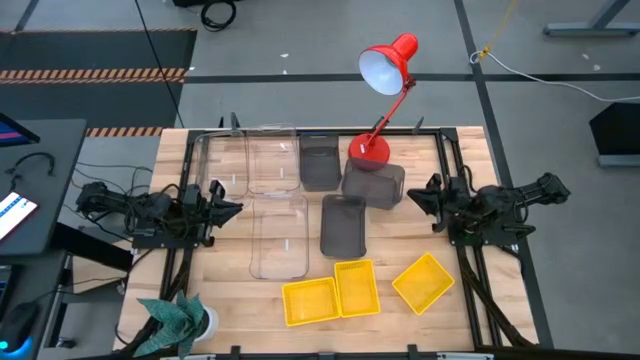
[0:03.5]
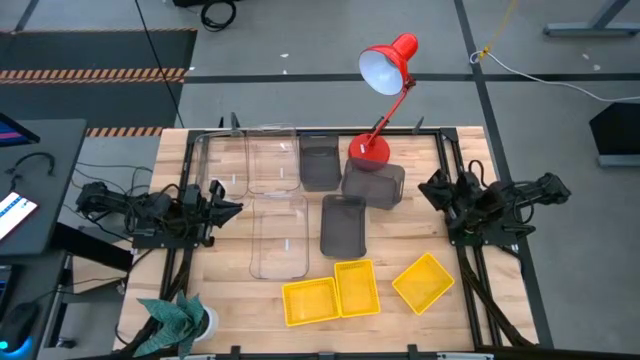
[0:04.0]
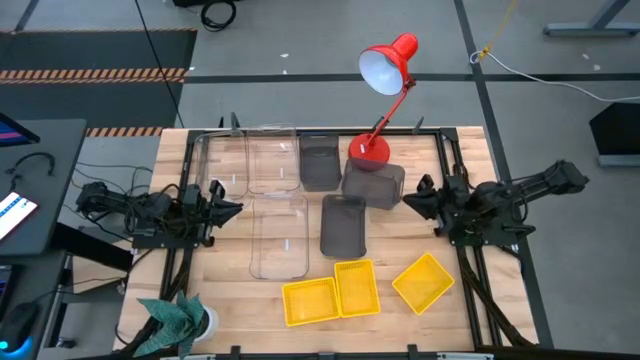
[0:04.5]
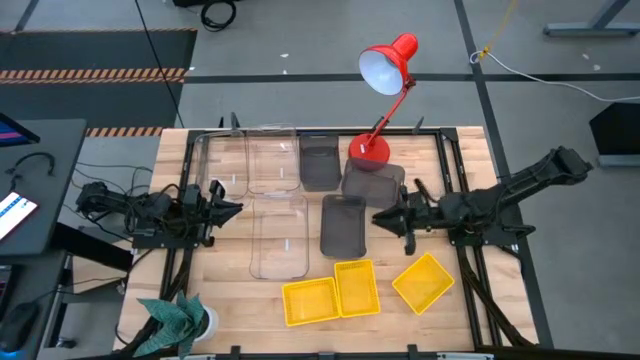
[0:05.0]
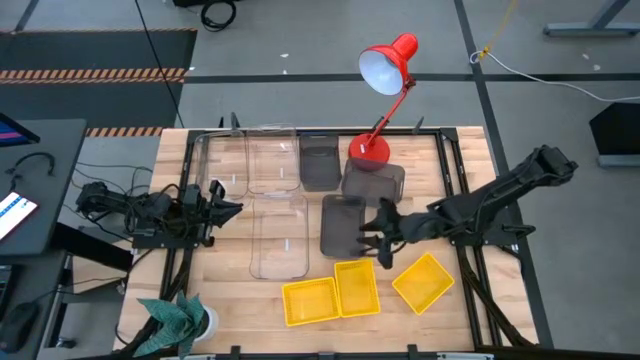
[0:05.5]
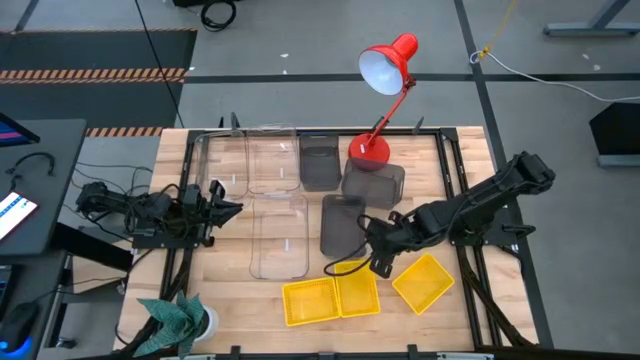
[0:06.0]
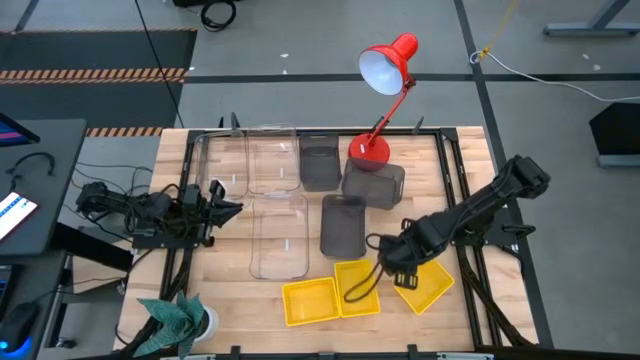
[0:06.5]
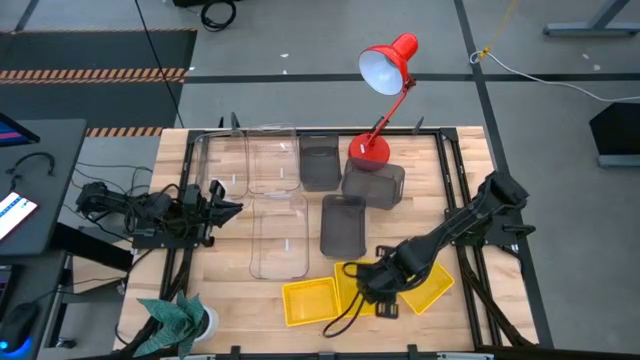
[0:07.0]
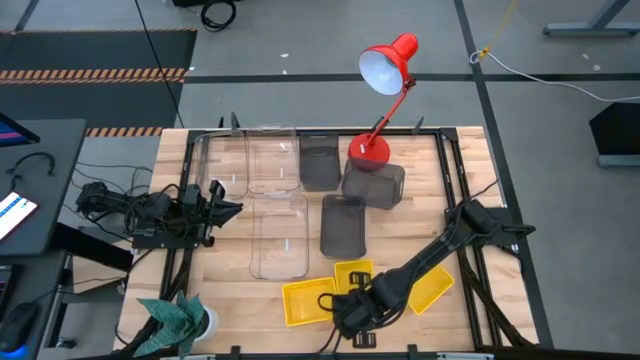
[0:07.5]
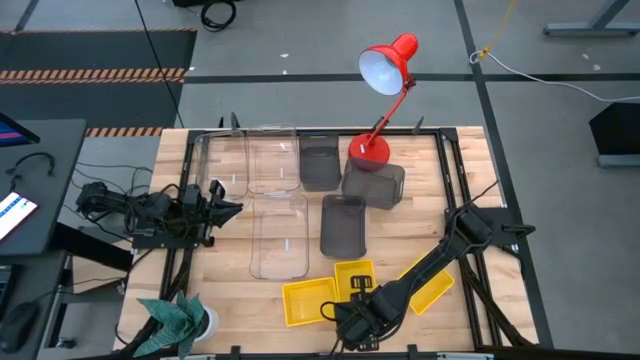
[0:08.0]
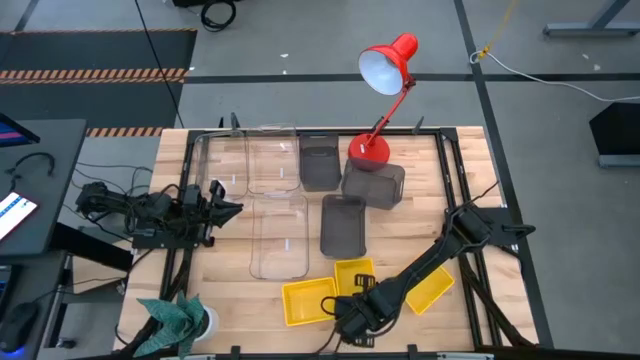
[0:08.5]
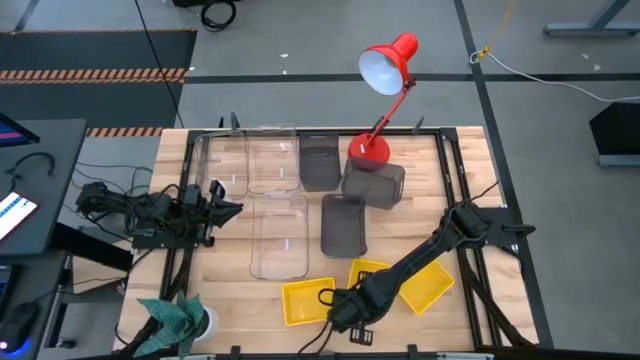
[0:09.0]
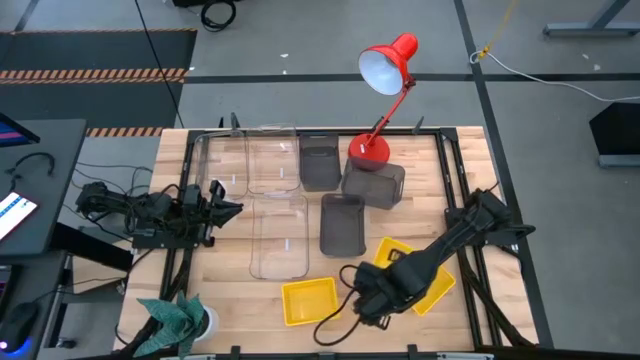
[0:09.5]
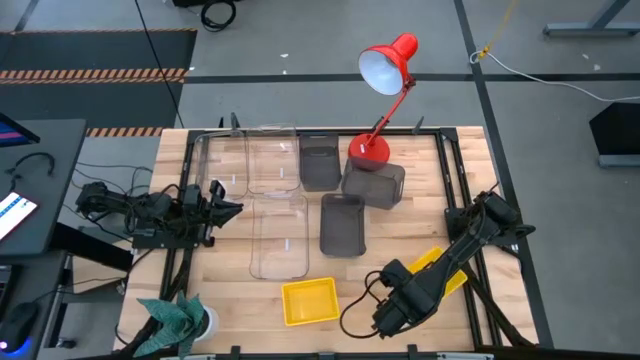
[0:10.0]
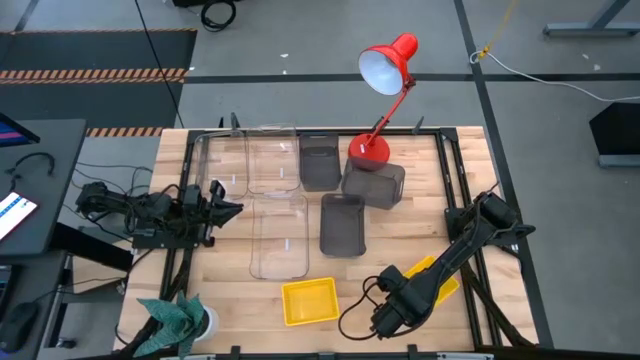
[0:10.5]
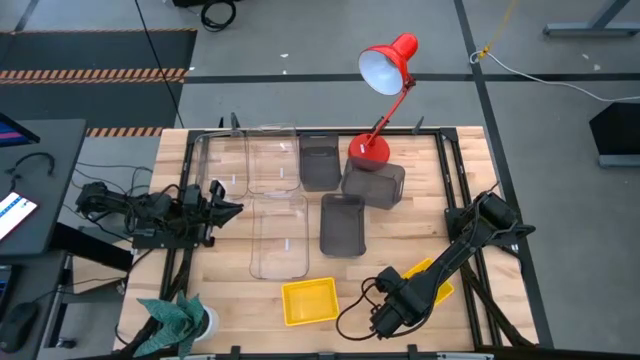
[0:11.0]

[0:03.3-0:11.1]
Stack the middle yellow bin on top of the right yellow bin

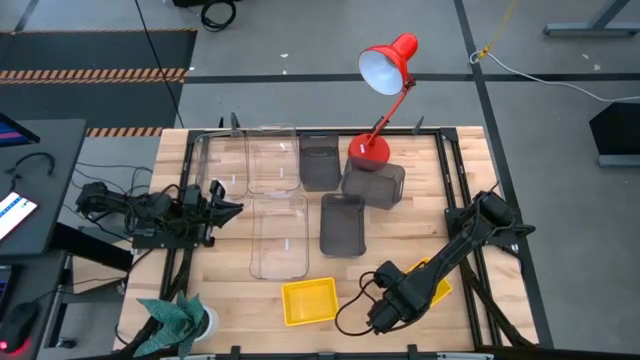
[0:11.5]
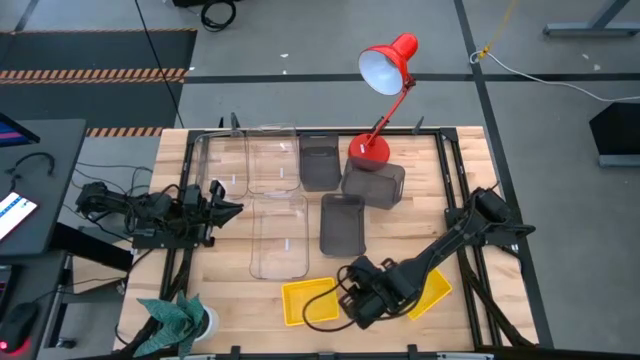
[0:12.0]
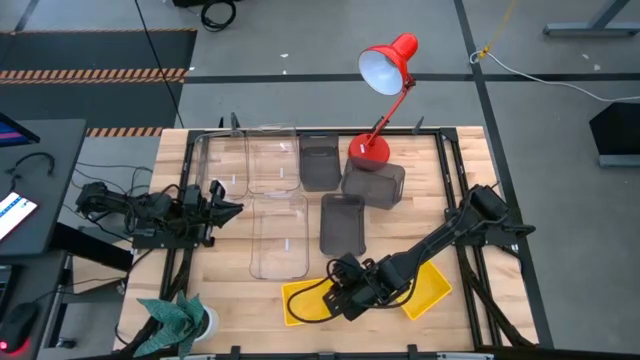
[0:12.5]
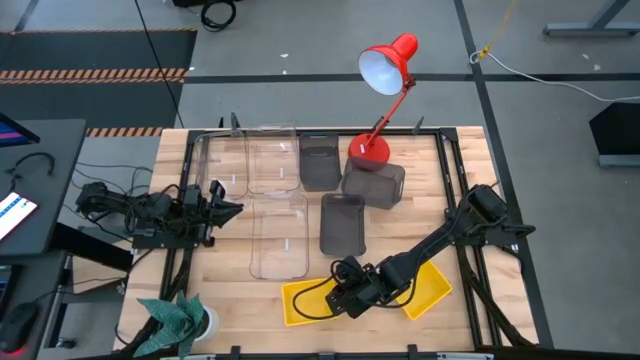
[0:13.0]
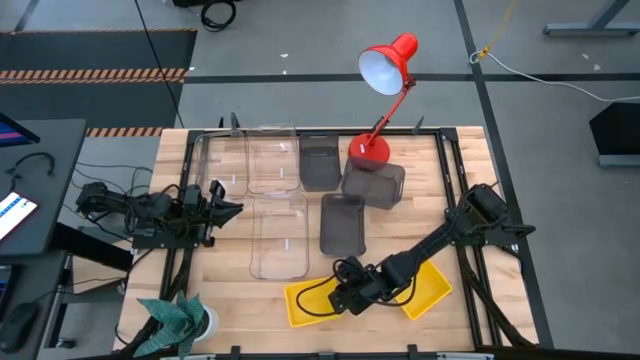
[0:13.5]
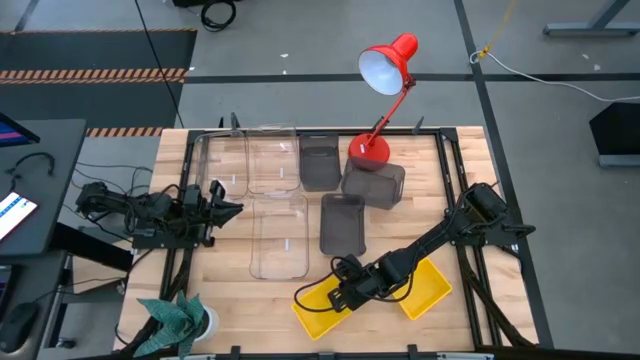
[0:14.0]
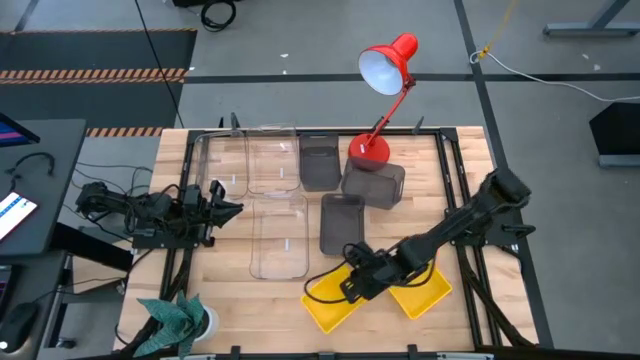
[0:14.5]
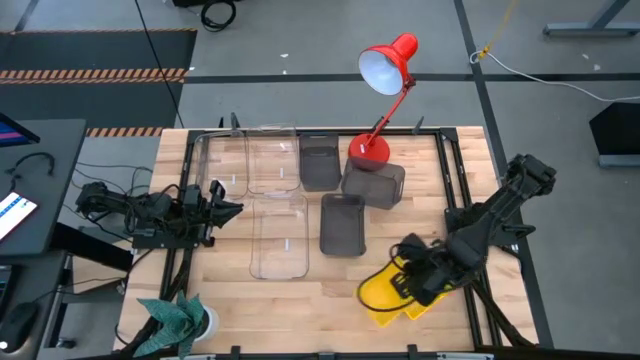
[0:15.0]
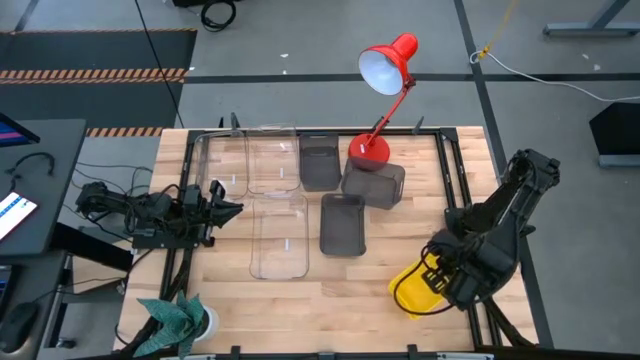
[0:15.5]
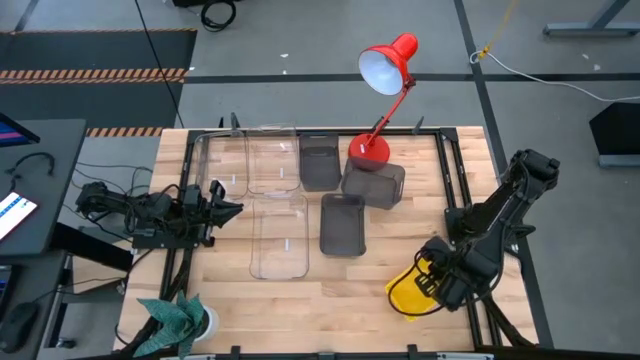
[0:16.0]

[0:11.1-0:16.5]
Stack the left yellow bin on top of the right yellow bins

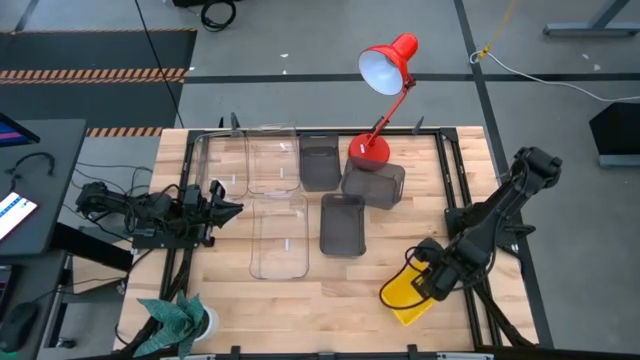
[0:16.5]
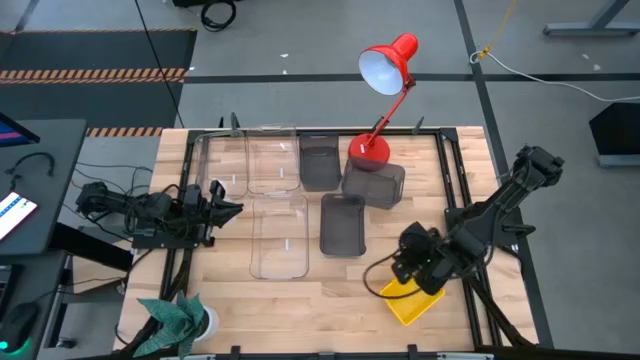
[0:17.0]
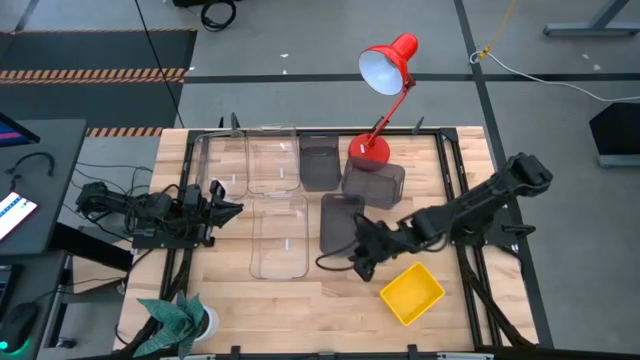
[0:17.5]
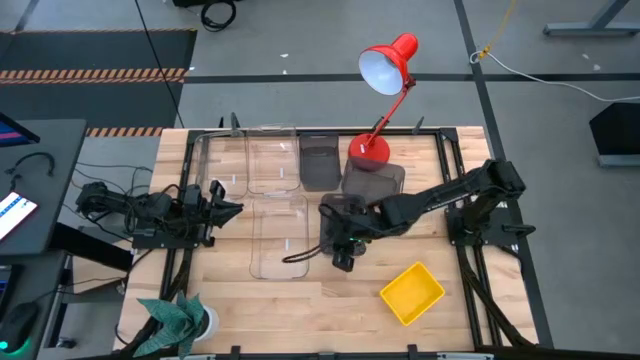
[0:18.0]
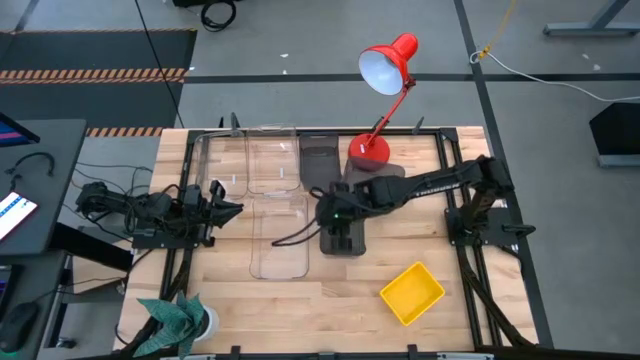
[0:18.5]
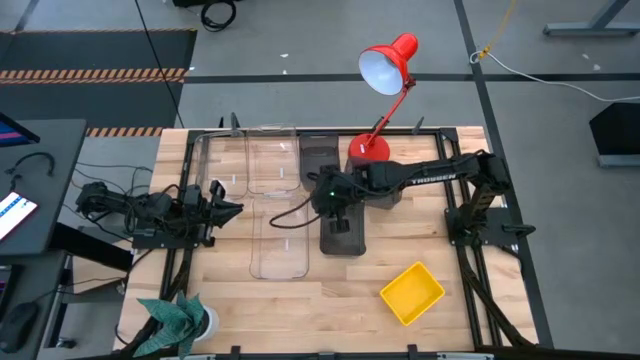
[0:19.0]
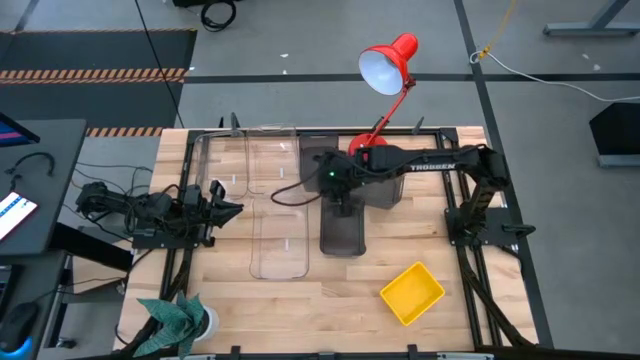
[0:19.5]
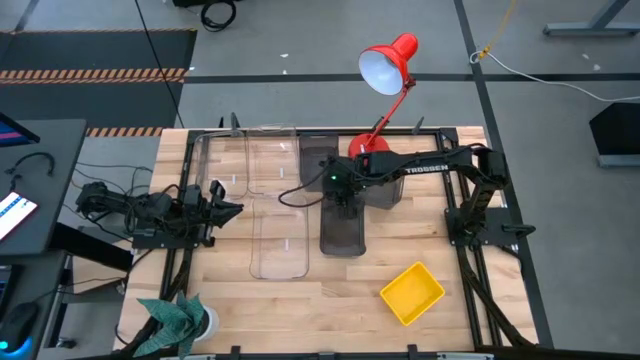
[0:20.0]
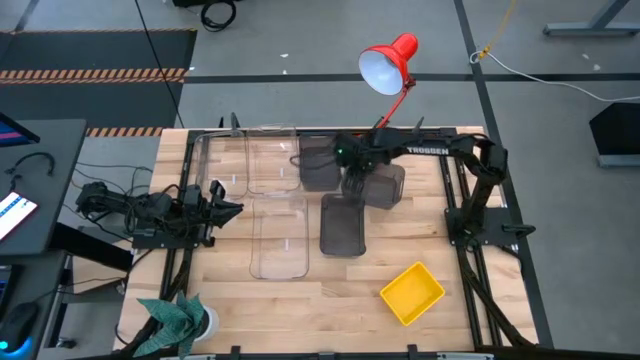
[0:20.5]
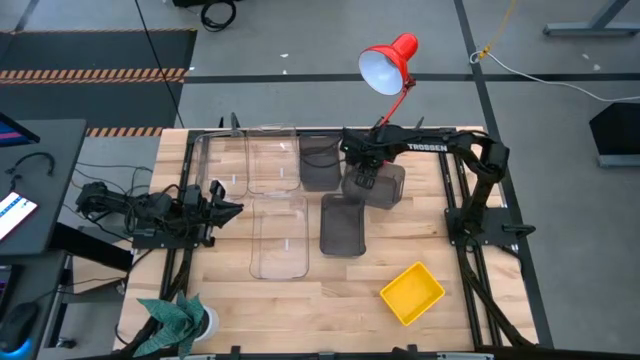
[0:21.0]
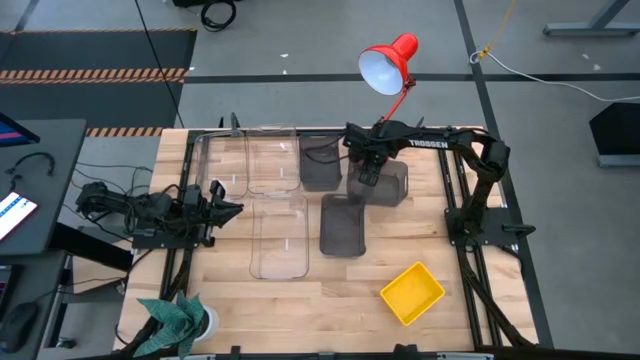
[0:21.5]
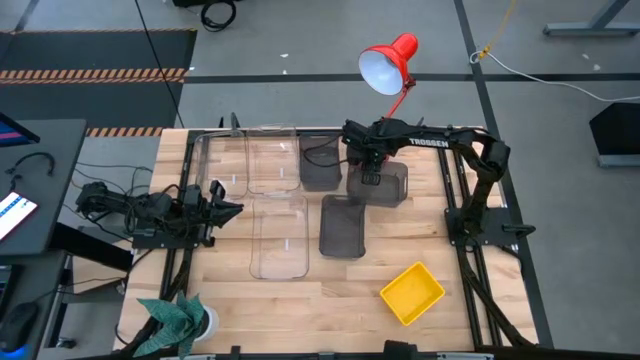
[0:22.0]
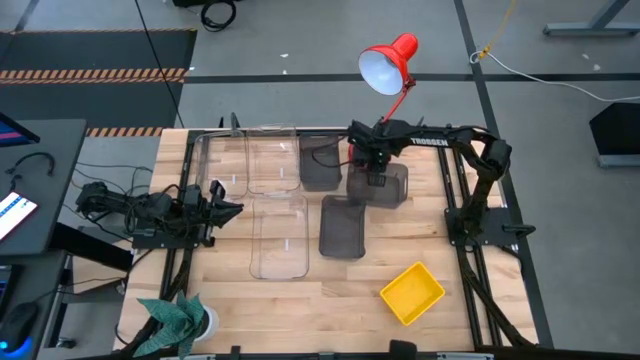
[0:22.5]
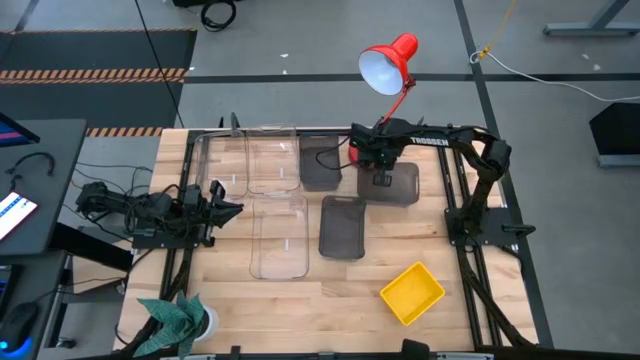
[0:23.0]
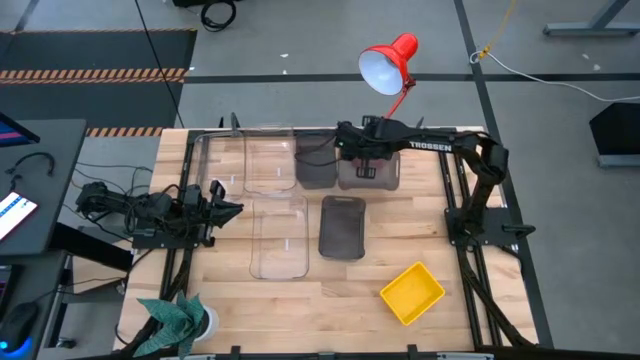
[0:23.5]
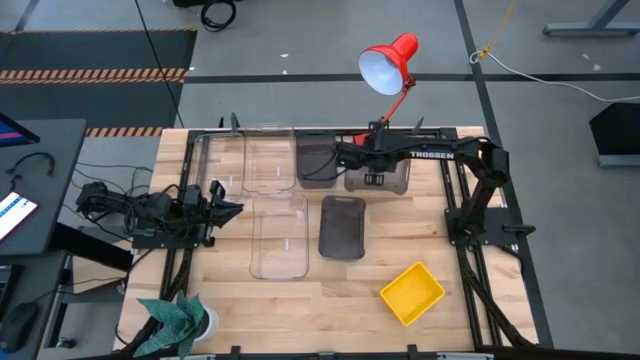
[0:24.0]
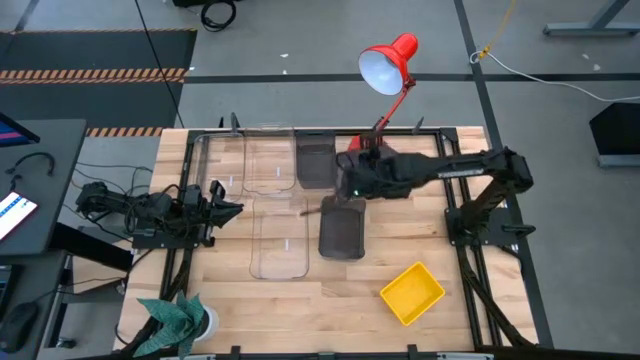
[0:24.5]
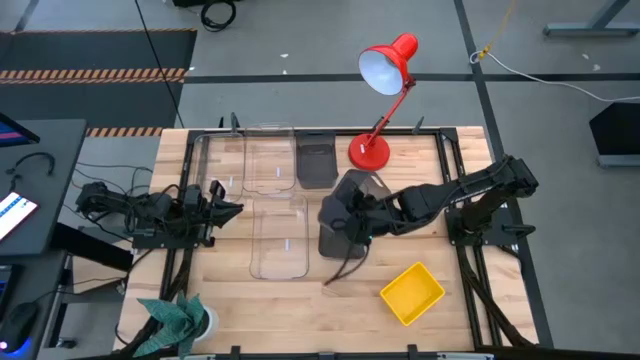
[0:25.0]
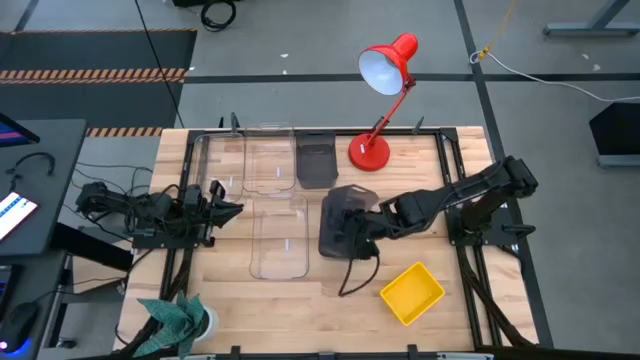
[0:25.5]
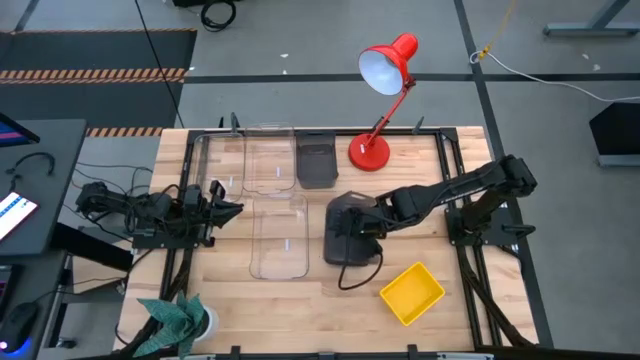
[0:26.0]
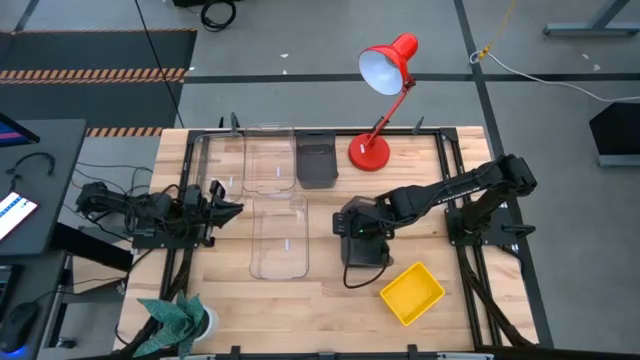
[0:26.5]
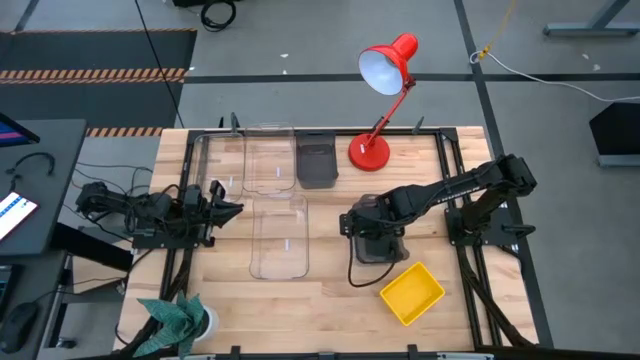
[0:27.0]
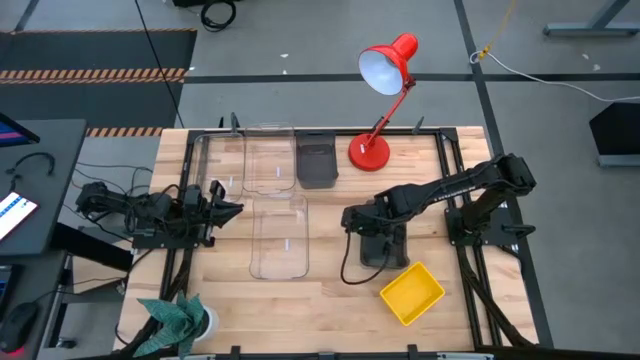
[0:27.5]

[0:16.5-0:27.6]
Stack the top right black bin on top of the bottom black bin
